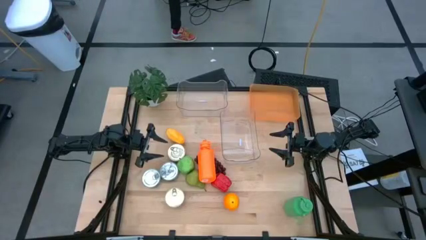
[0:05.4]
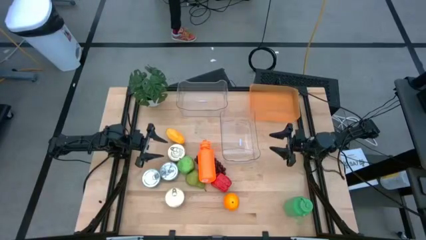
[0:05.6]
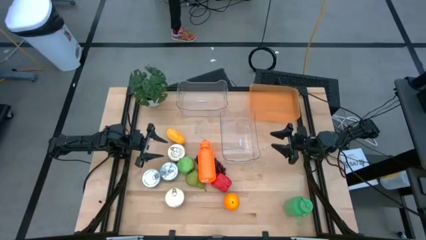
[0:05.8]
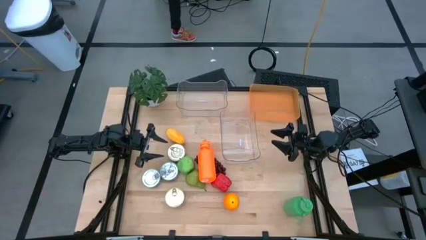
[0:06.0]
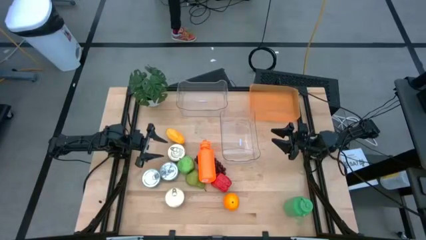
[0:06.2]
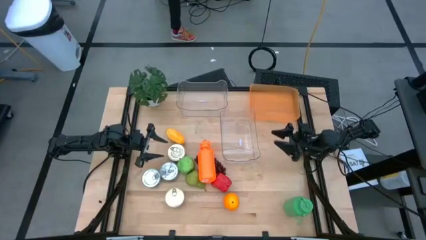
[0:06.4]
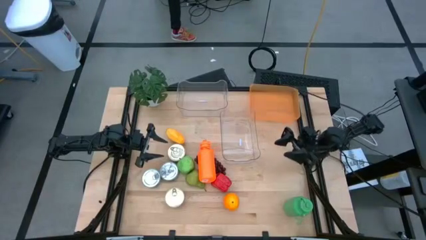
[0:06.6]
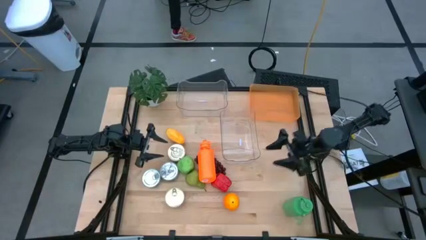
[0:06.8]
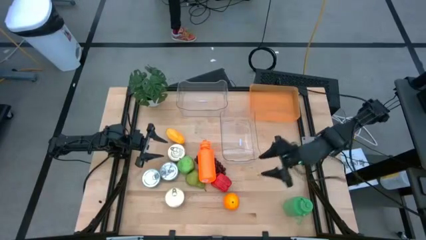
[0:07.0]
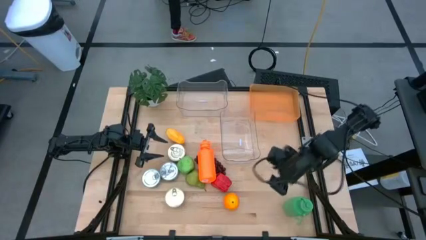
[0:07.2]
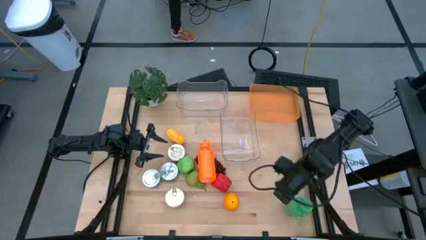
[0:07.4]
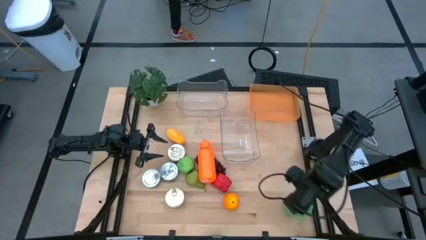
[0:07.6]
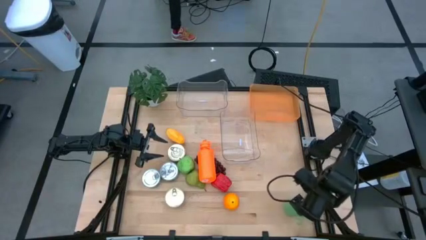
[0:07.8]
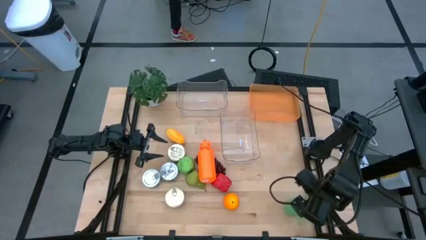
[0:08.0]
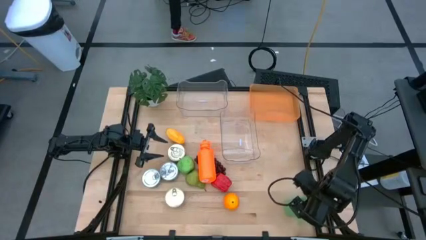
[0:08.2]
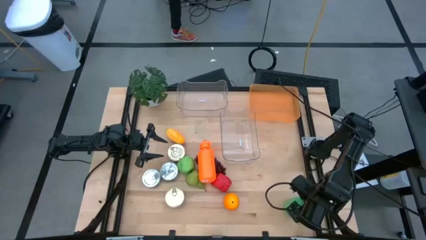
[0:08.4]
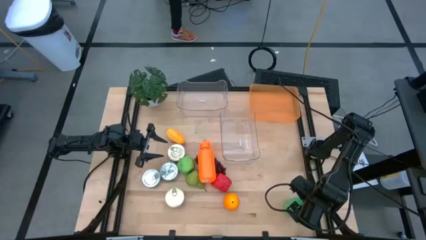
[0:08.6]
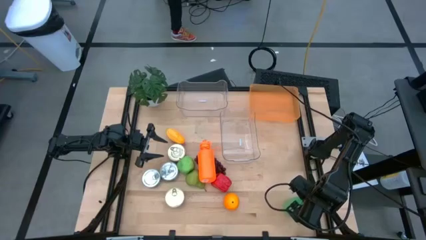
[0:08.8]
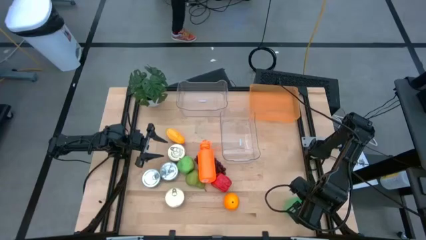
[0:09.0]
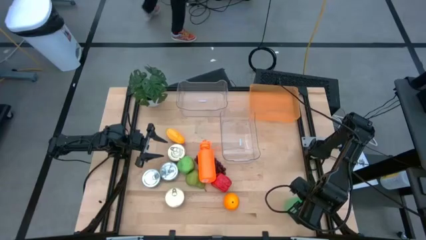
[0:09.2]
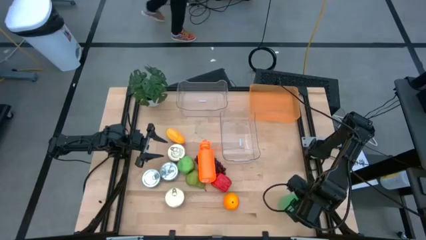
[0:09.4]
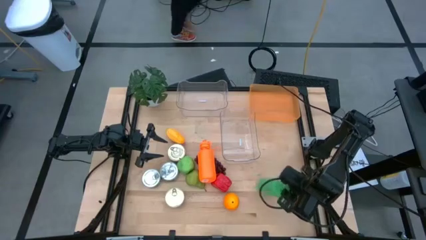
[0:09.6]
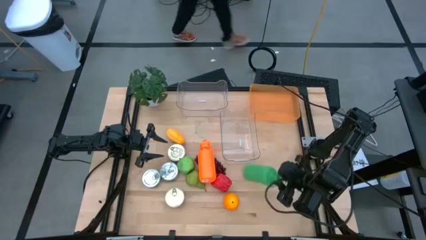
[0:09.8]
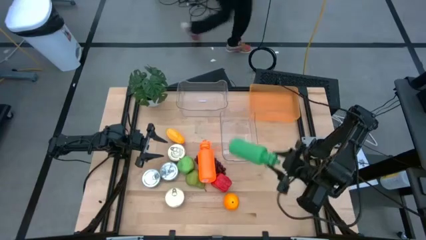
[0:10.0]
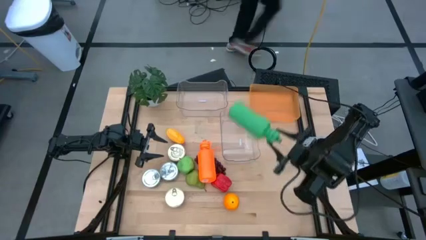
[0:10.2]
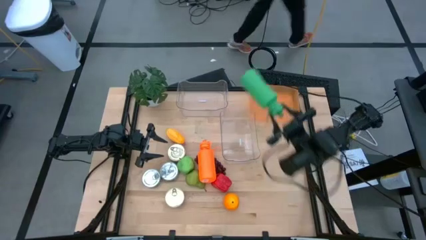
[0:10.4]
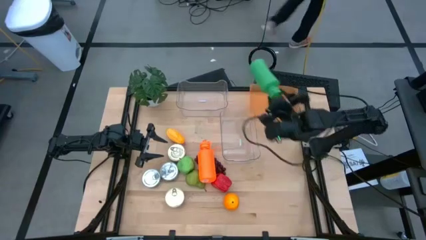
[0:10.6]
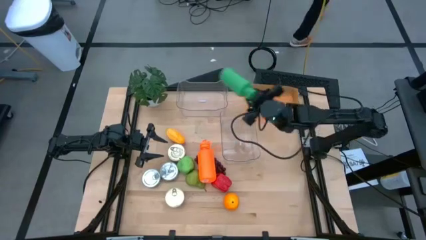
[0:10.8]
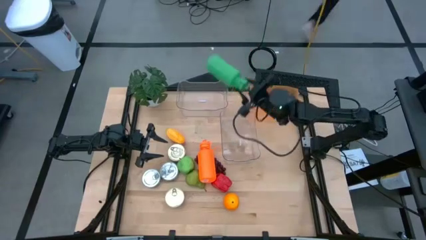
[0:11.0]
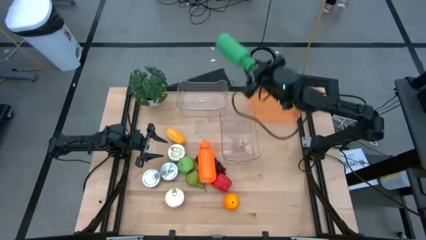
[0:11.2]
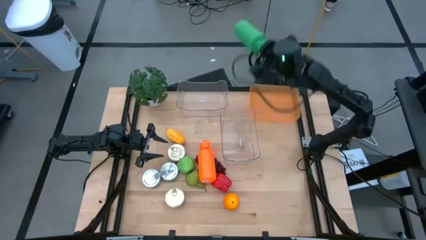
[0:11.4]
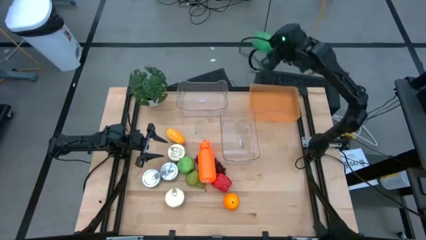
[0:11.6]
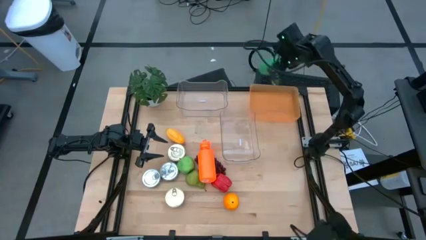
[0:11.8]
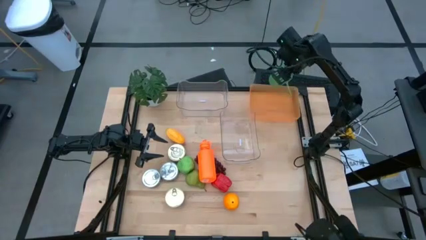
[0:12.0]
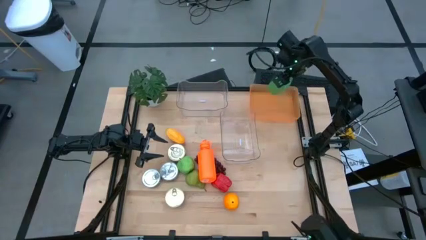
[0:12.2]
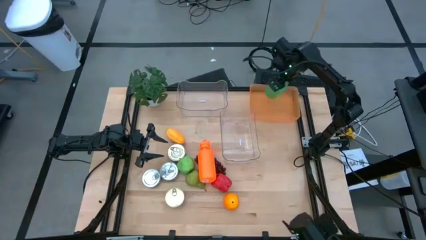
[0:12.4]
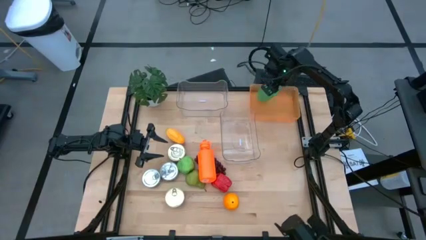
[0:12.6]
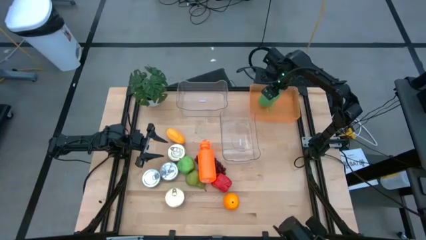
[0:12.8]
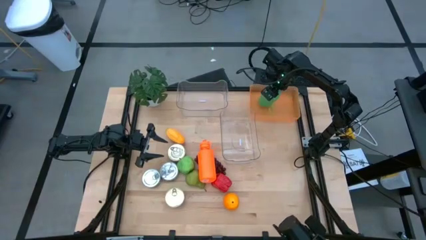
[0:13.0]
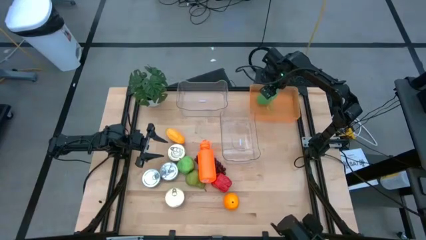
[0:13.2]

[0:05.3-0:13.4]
Task: Pick & Place Food Item
Put the green water bottle into the orange bin

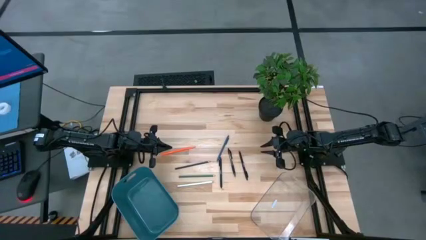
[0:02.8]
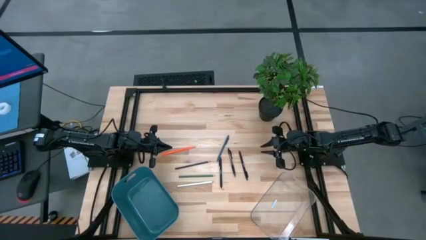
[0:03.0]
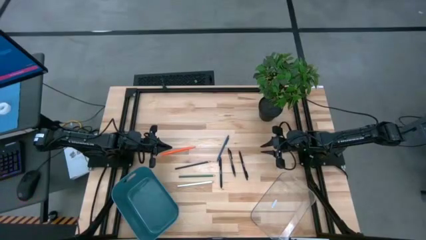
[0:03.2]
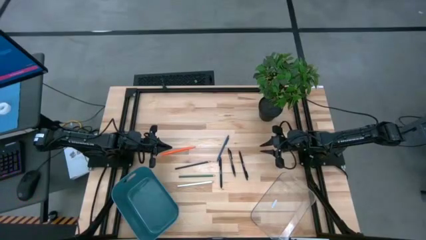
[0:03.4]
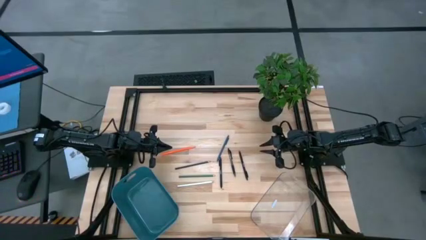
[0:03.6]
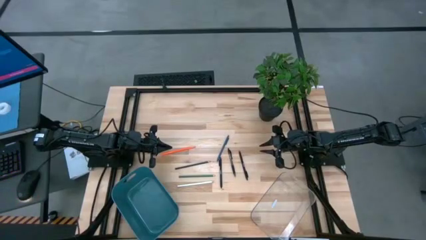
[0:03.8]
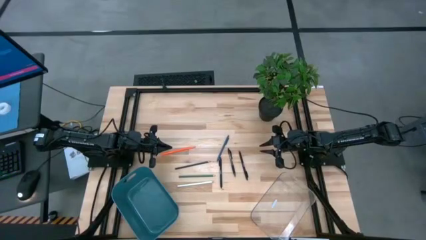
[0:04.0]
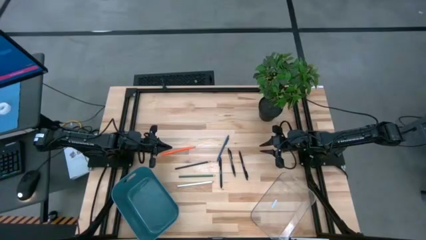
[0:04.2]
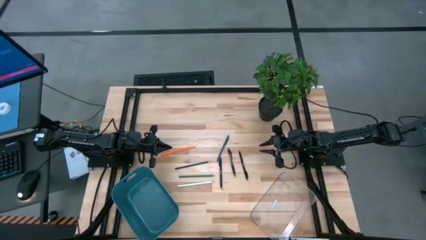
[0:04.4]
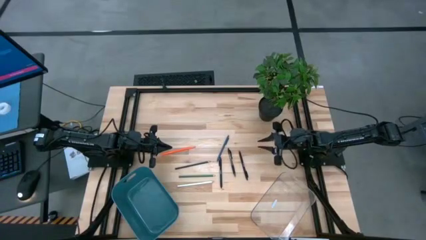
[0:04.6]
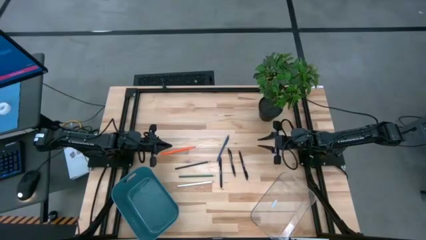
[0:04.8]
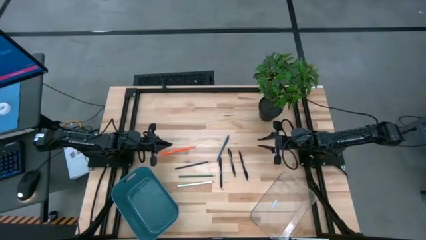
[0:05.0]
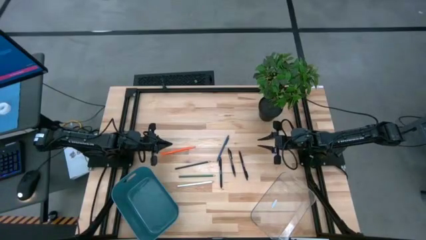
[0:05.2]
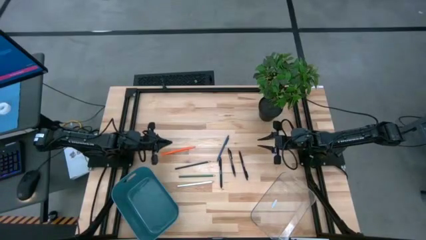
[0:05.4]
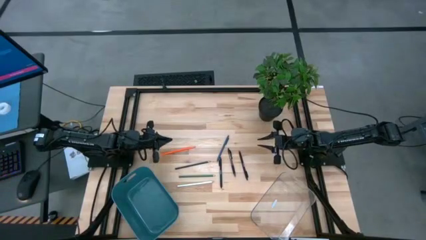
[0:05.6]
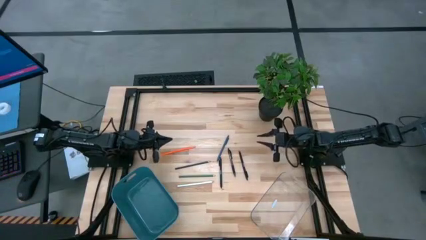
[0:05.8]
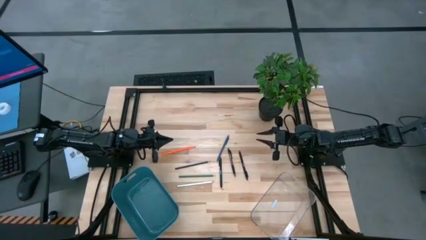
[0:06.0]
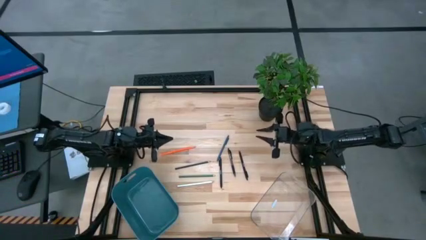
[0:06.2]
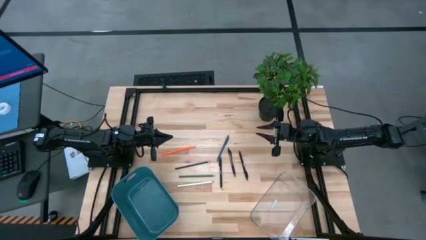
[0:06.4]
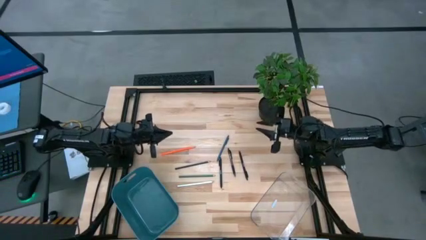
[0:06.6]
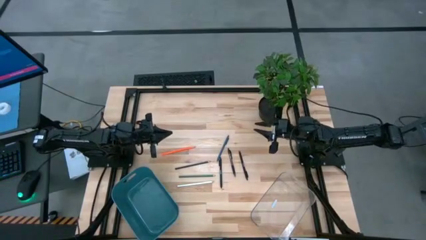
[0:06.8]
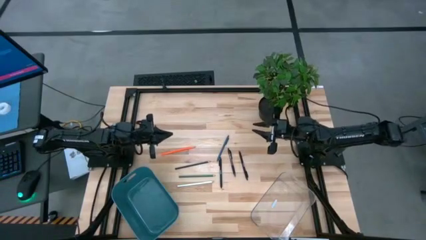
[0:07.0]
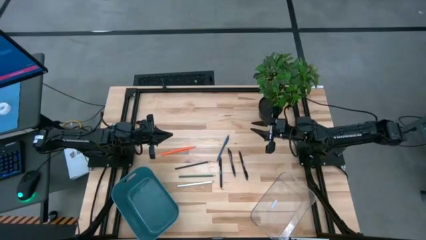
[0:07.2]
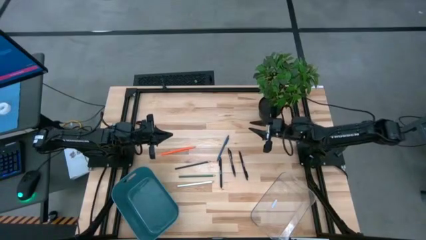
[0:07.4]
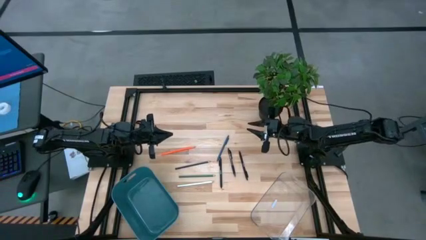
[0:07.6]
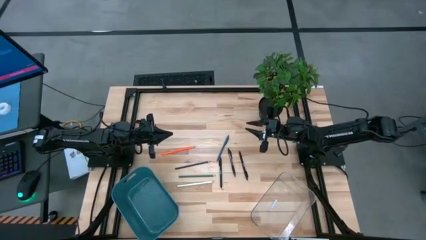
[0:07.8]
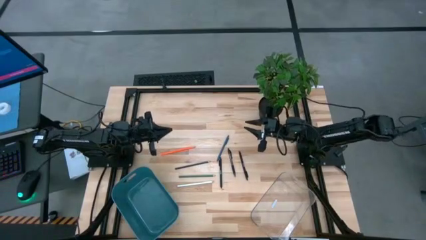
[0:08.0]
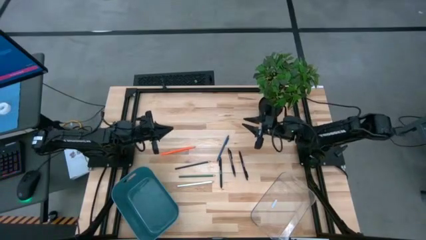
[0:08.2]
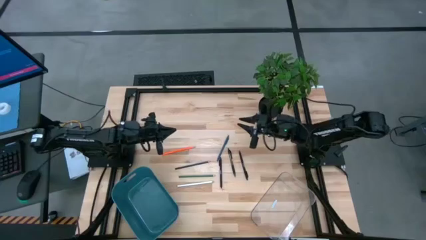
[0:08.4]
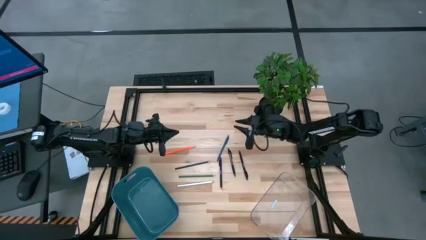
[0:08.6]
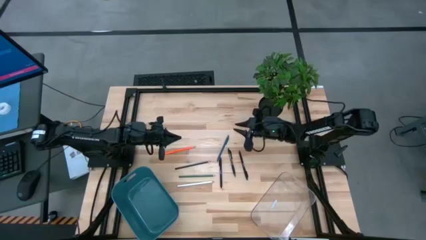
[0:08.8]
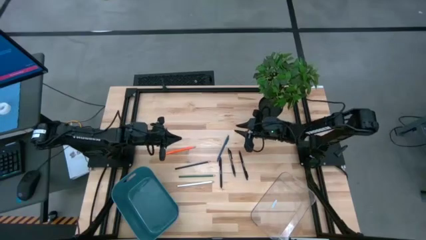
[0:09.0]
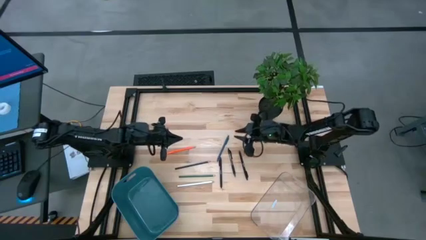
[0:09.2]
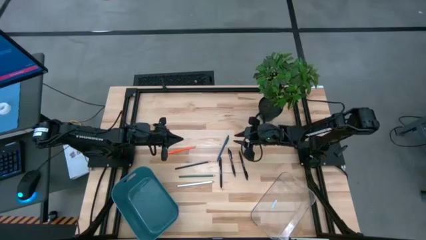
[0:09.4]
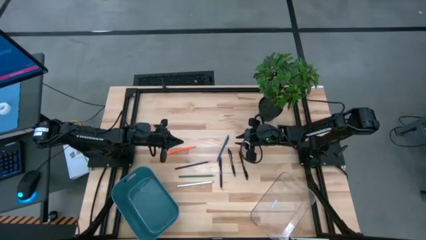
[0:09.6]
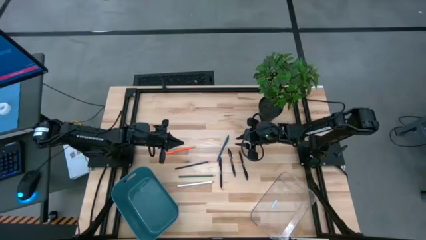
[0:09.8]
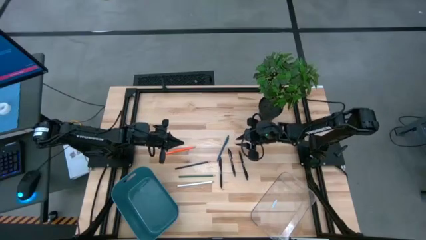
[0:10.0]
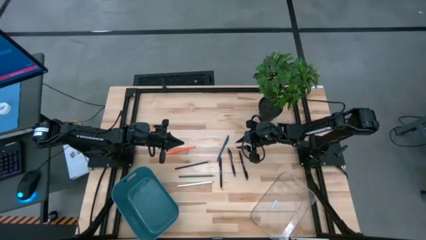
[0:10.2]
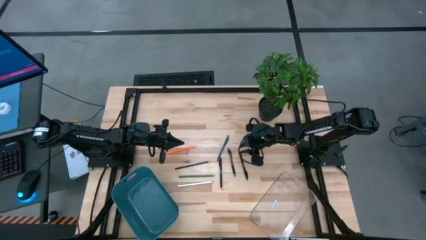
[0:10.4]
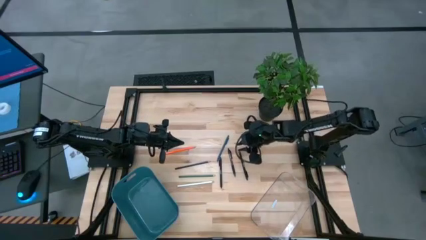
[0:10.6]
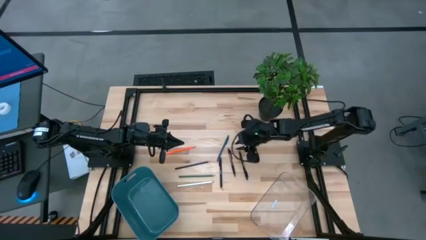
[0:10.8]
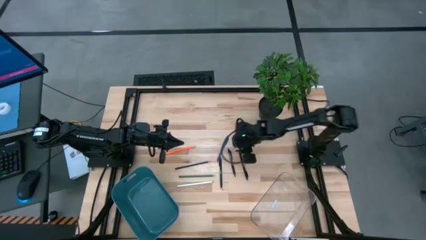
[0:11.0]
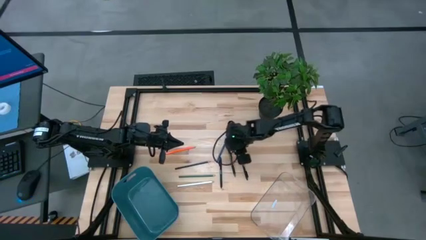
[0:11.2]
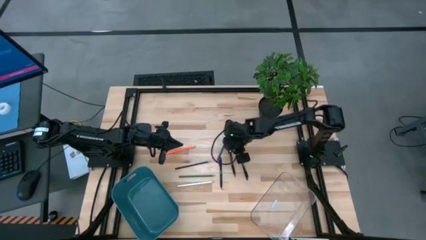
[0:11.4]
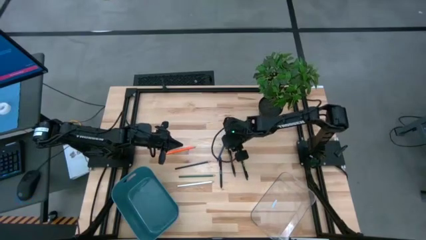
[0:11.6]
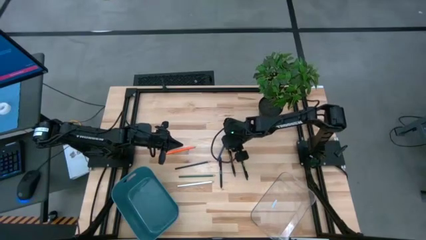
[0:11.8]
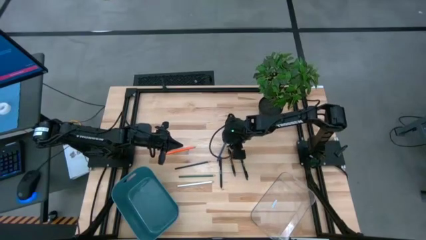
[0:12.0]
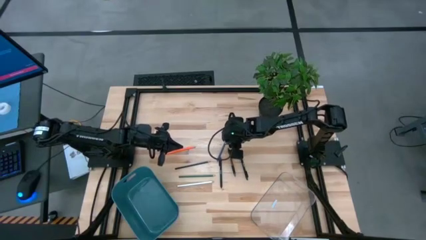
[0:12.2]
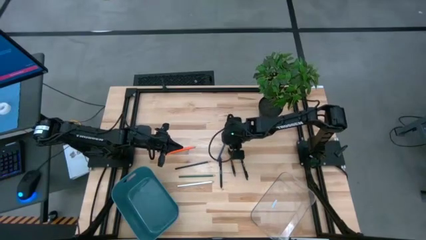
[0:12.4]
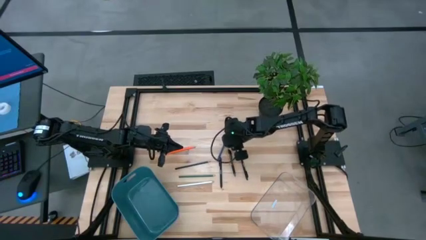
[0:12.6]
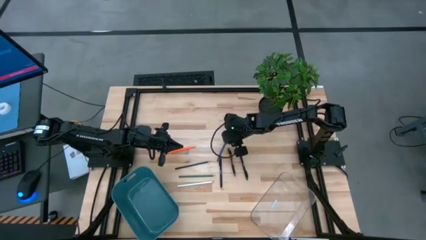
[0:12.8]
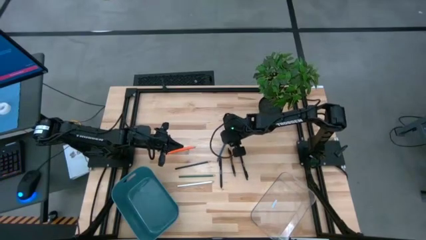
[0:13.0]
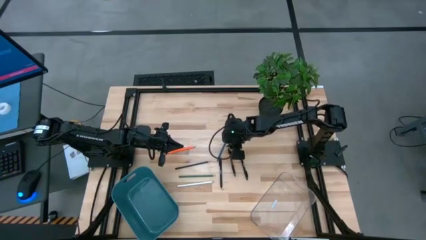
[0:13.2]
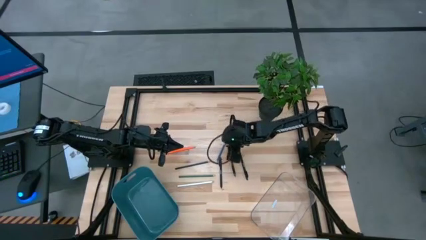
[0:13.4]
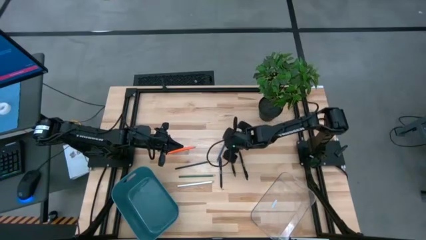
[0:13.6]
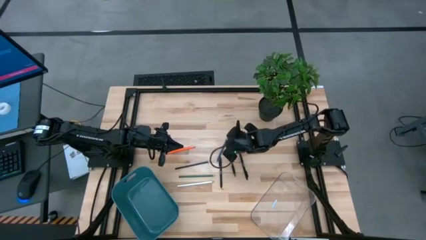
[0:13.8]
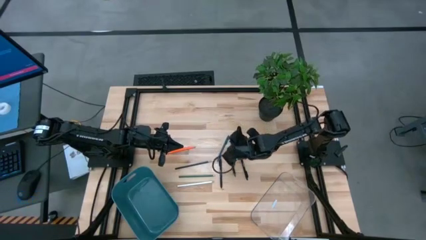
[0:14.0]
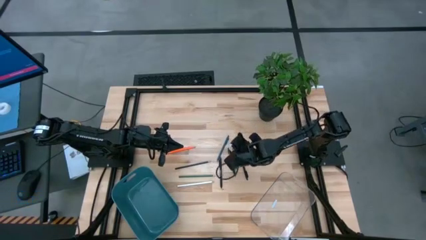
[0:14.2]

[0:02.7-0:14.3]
Task: Sort pens & pencils
Put the right black pen into the transparent bin
